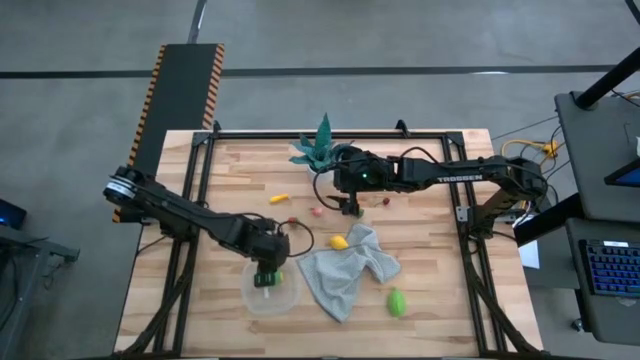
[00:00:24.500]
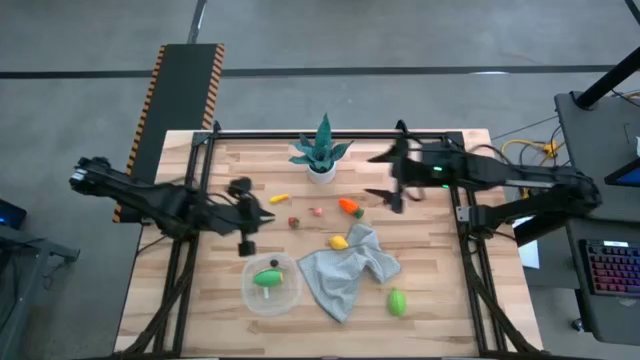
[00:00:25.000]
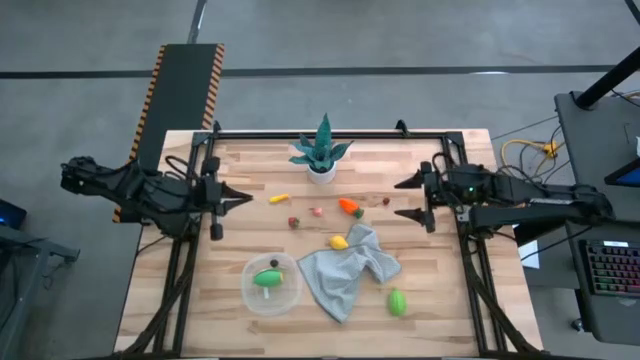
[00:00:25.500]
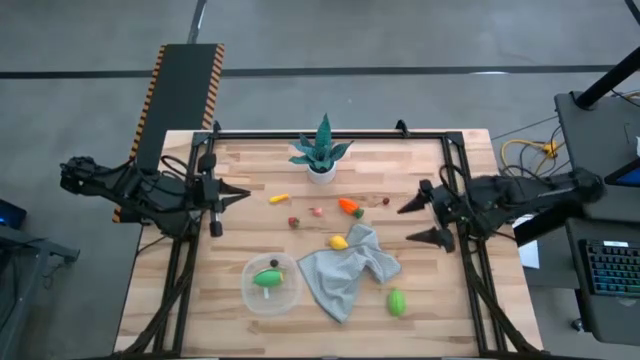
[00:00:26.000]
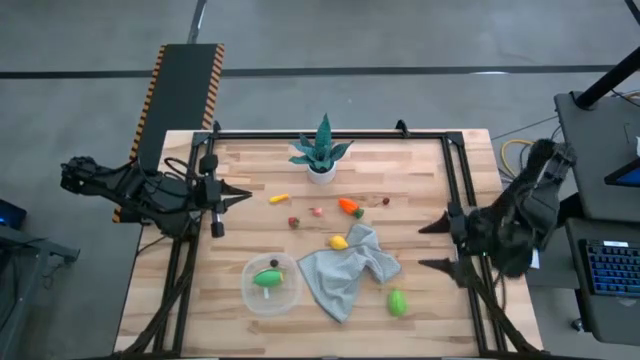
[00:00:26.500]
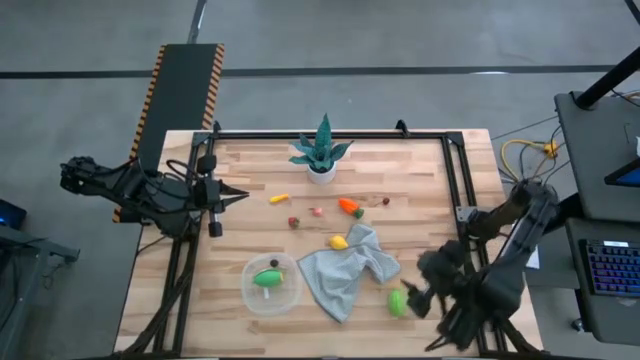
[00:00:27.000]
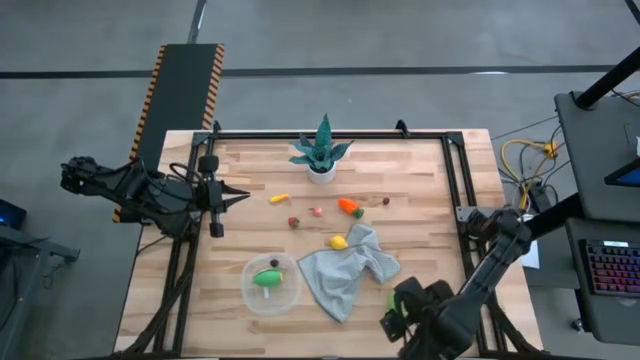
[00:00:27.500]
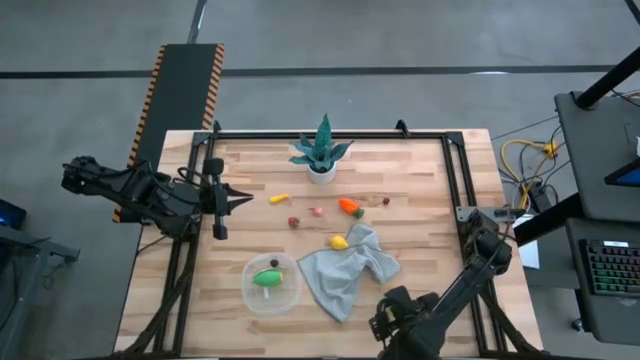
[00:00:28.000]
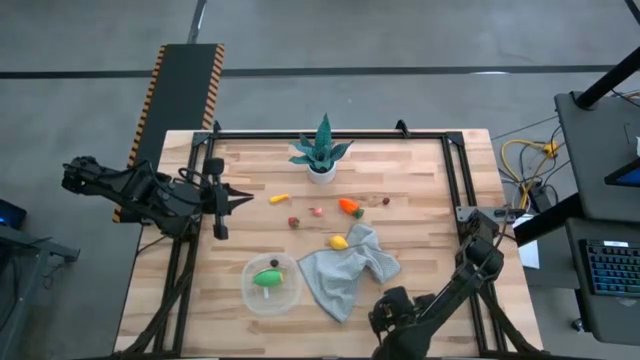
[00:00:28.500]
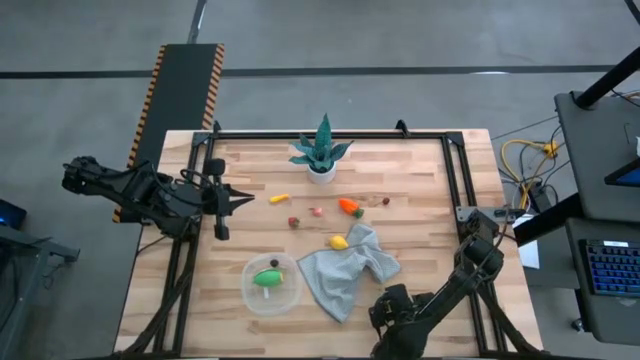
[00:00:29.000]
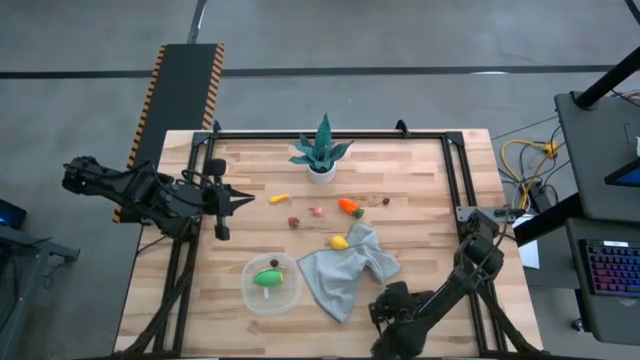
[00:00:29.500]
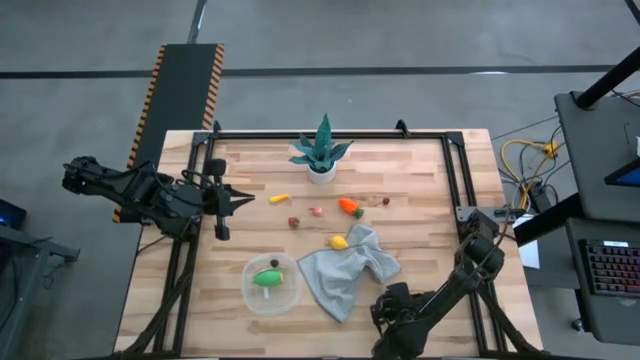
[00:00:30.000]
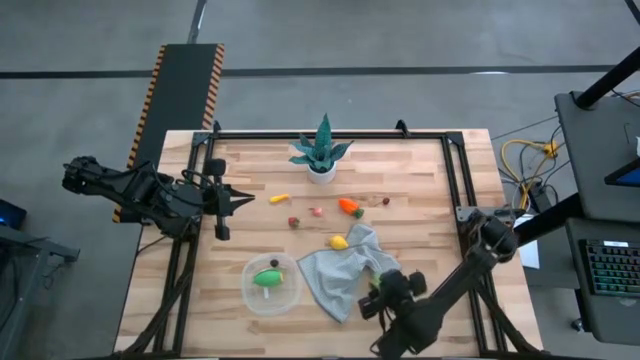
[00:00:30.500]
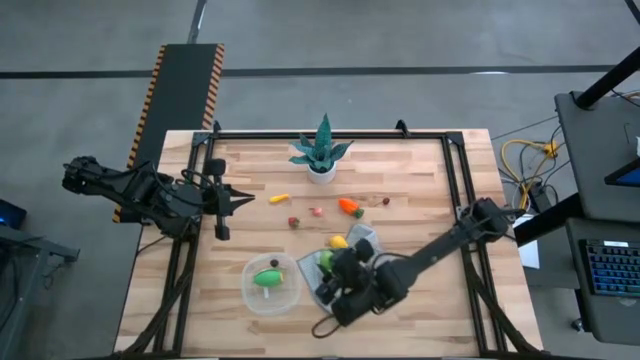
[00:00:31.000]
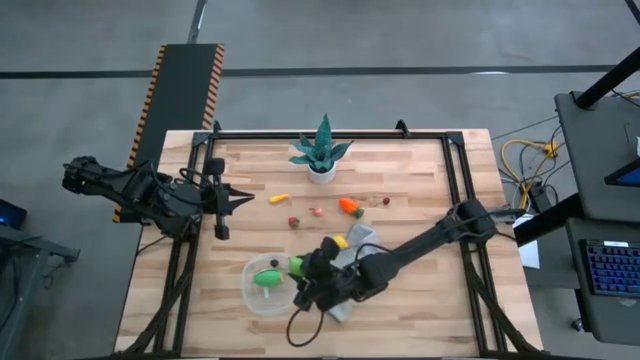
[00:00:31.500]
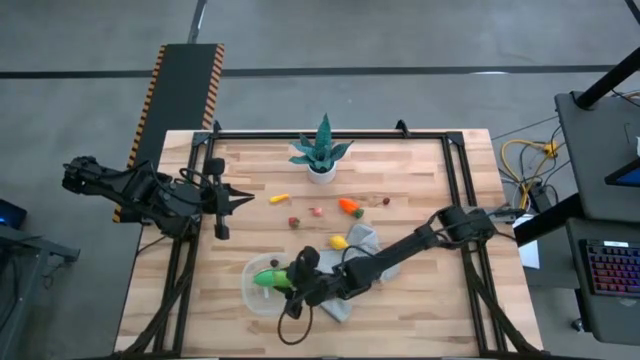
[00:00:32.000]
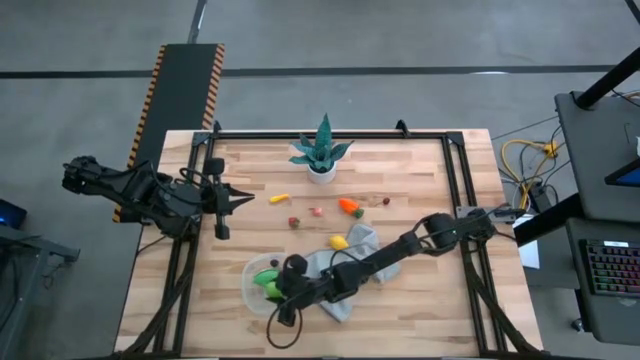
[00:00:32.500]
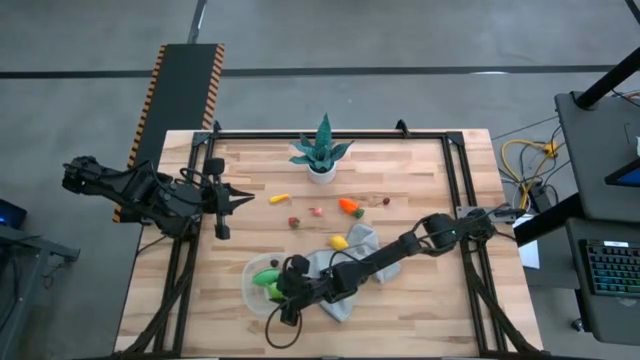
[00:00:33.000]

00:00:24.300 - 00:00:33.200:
Task: Pick and placing Produce into tupperware
Put the green melon in the transparent bin

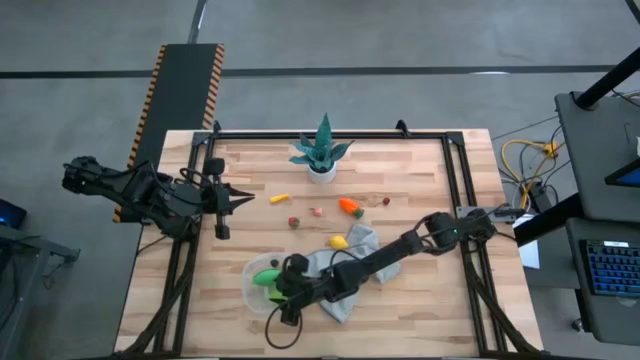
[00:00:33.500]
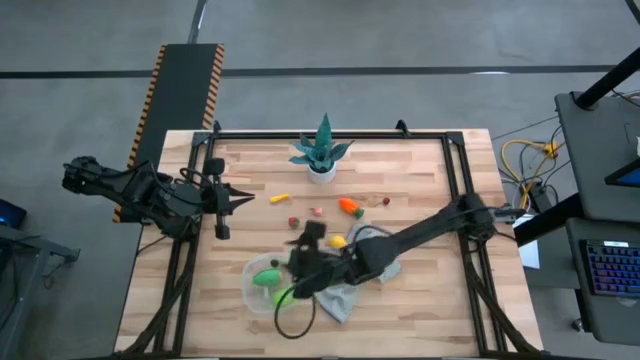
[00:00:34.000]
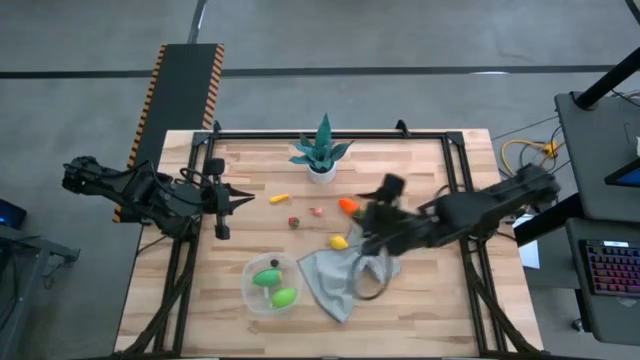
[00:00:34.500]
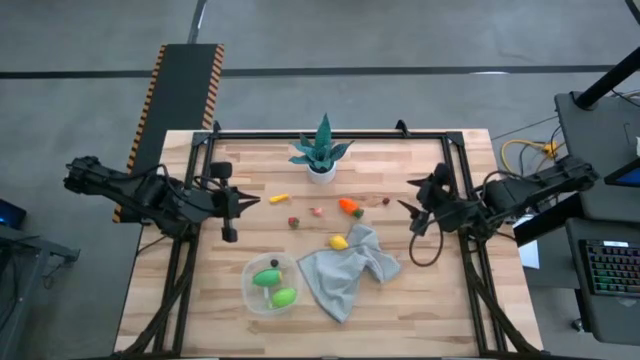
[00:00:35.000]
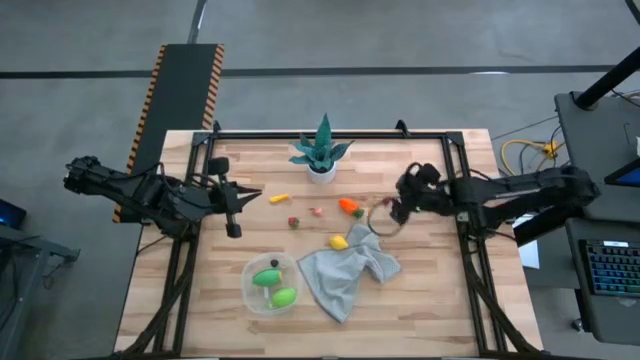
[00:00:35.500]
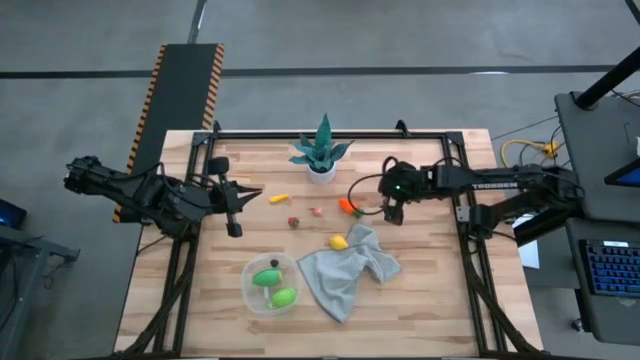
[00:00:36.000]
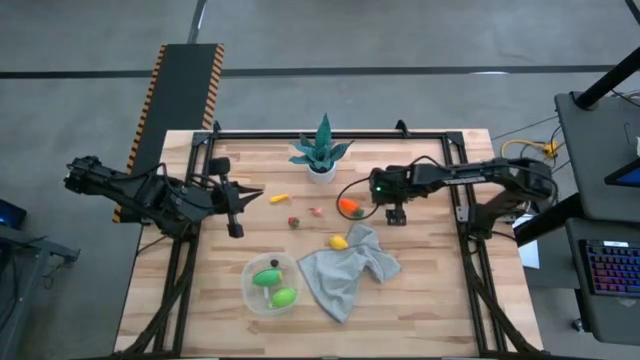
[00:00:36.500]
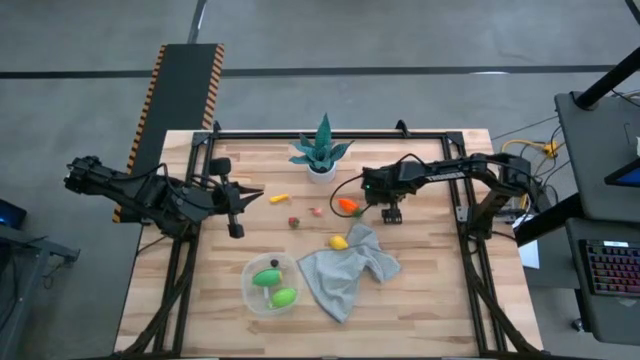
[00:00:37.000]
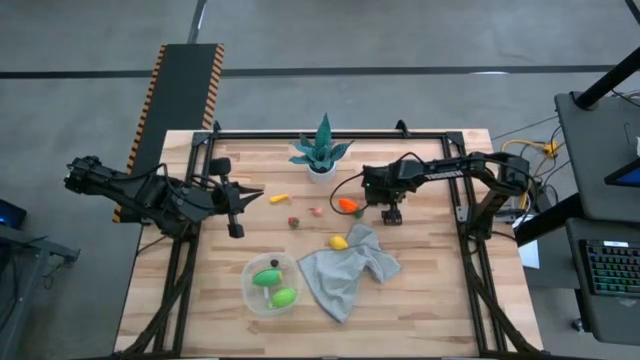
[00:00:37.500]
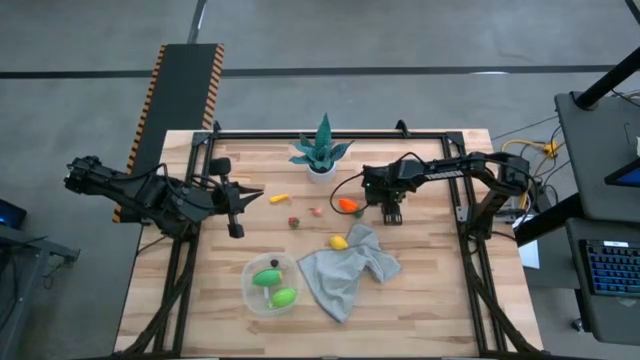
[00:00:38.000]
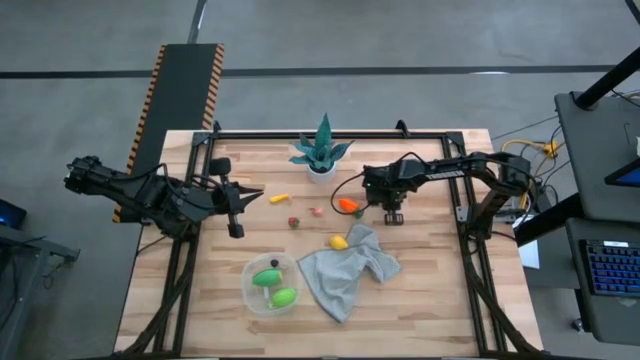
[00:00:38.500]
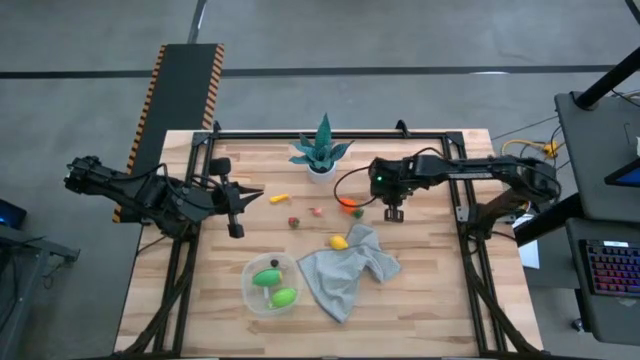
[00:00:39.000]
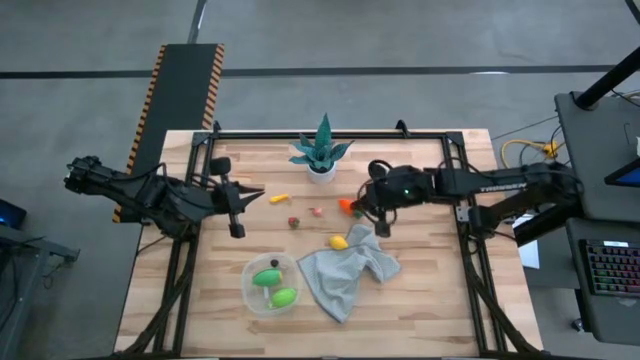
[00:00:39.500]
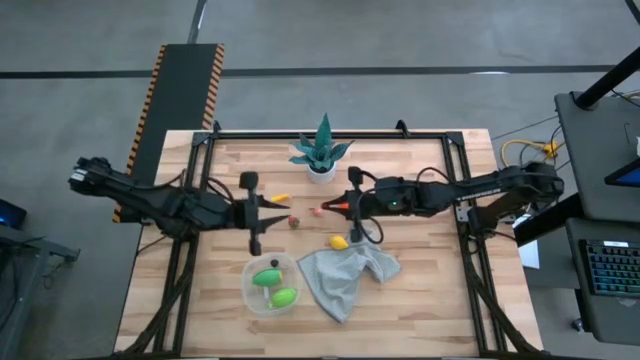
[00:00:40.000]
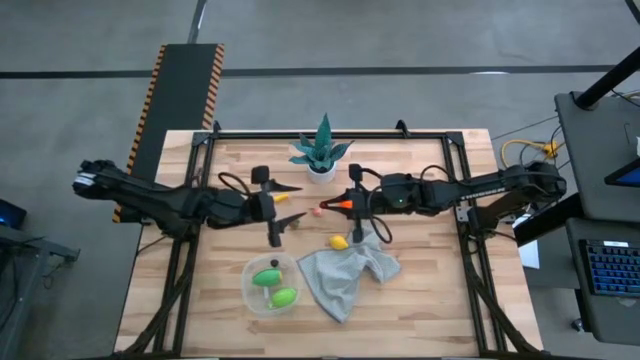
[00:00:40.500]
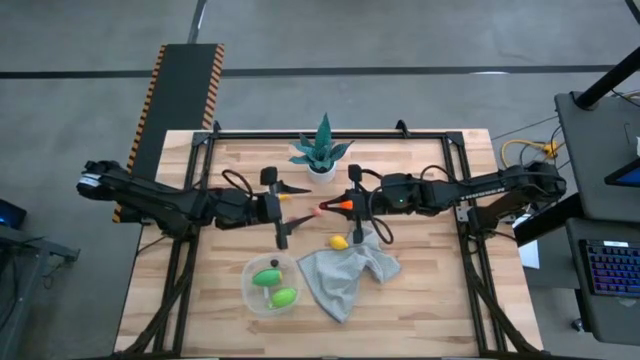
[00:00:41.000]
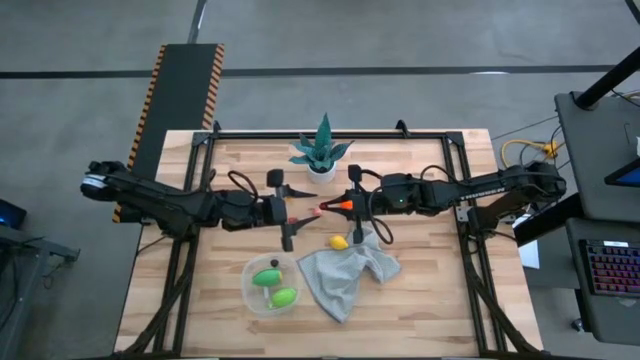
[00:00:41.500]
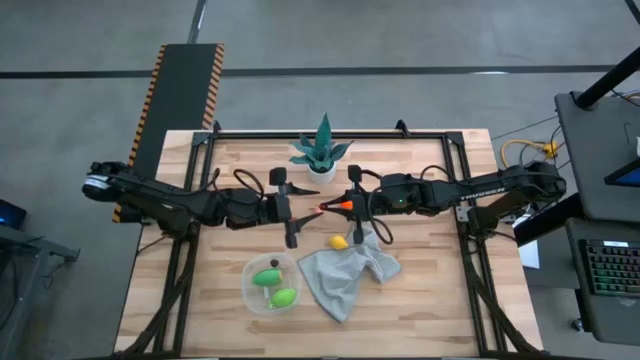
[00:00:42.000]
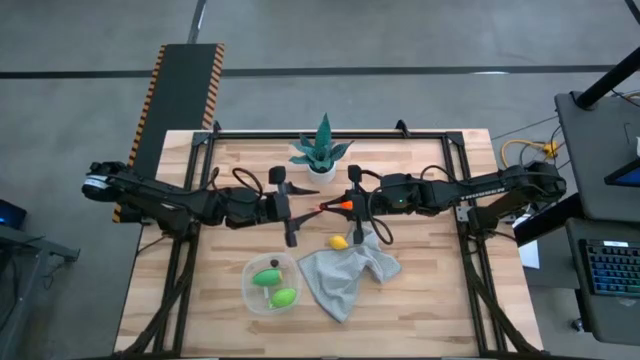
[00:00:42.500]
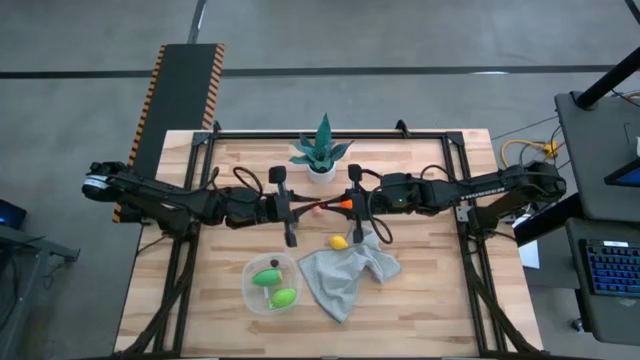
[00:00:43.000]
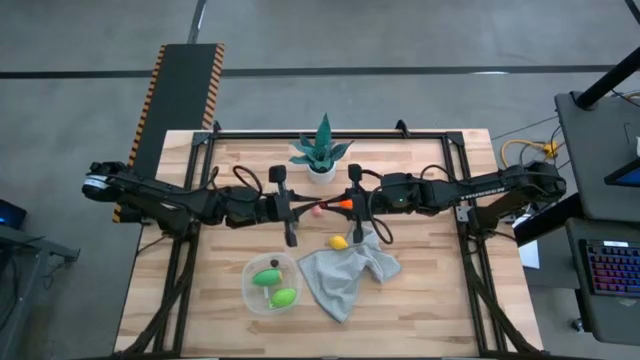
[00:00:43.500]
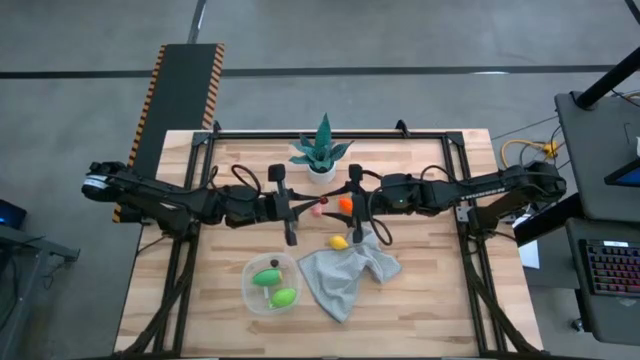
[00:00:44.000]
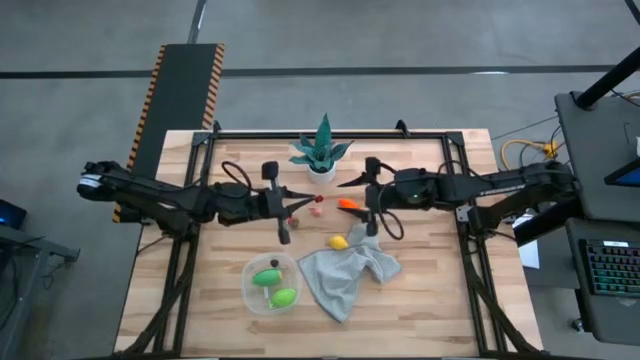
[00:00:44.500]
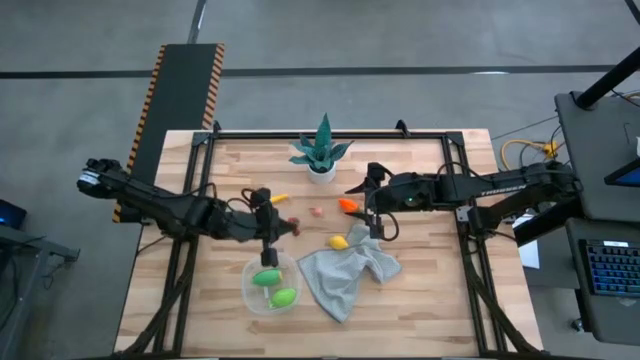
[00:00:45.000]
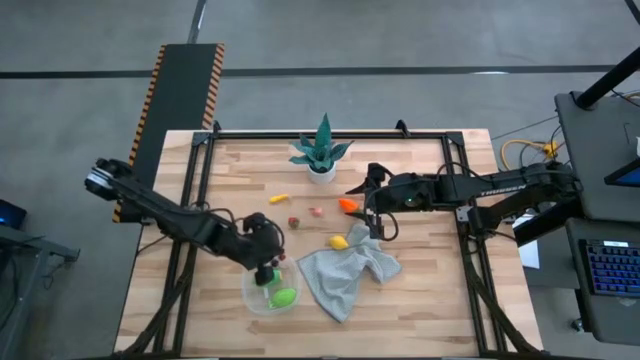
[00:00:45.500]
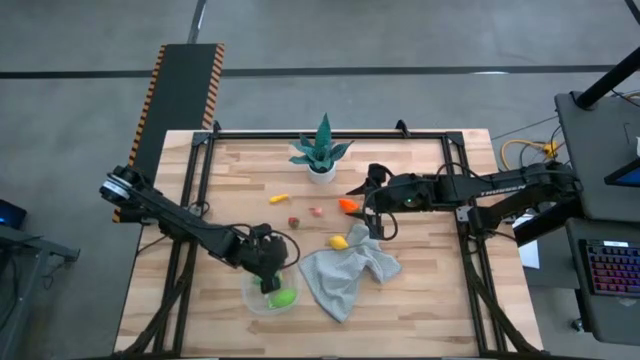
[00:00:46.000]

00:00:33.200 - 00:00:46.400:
Put the red cherry in the transparent bin
